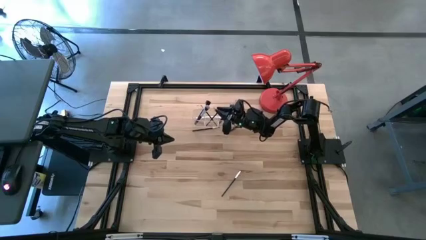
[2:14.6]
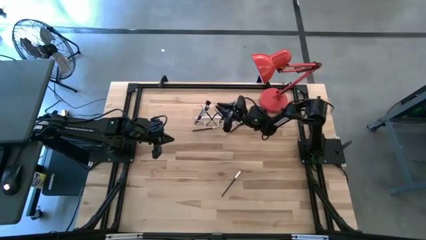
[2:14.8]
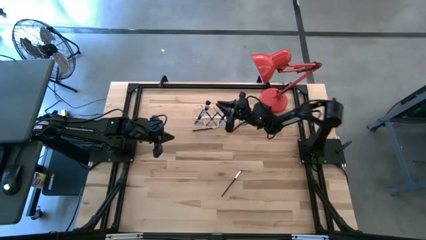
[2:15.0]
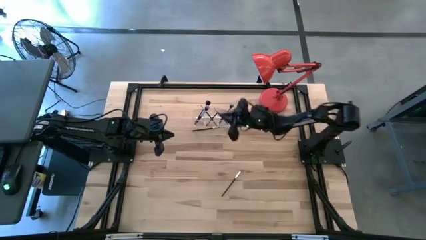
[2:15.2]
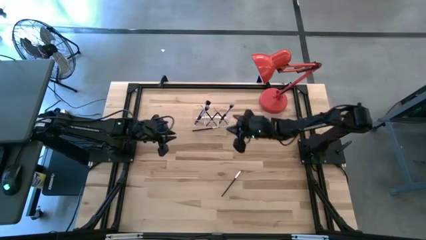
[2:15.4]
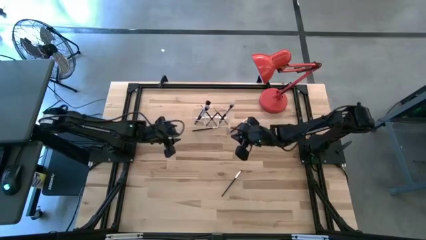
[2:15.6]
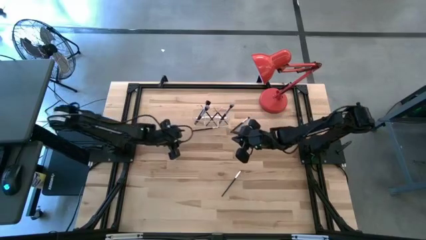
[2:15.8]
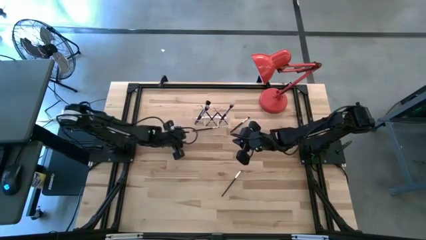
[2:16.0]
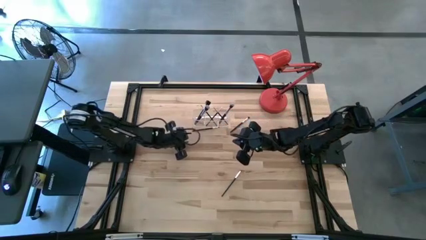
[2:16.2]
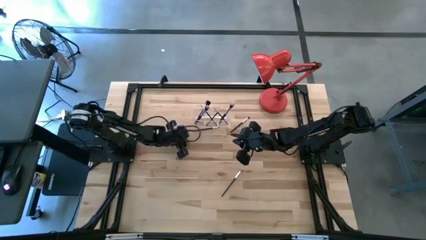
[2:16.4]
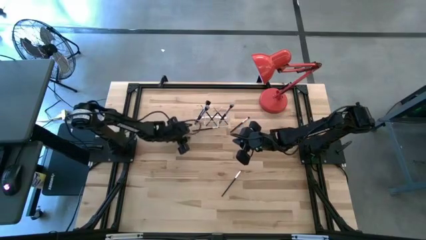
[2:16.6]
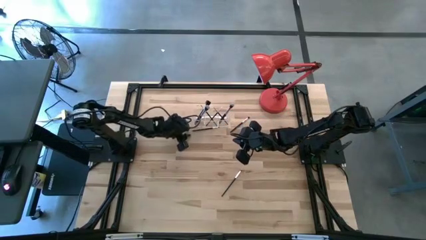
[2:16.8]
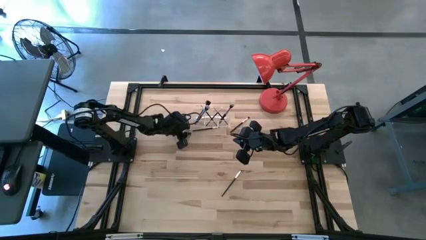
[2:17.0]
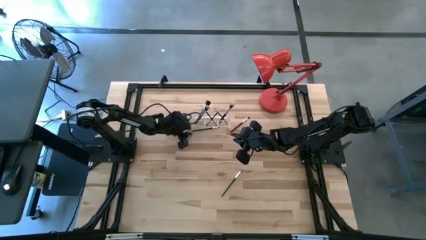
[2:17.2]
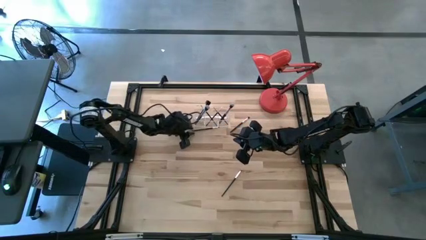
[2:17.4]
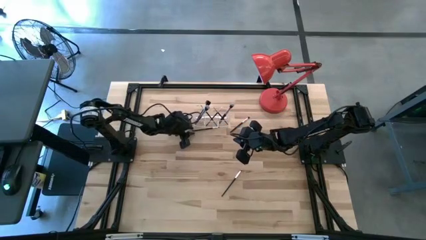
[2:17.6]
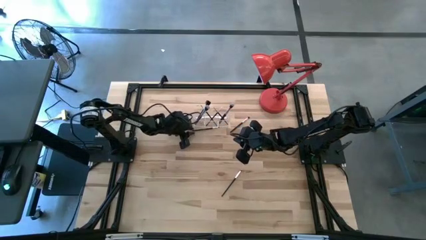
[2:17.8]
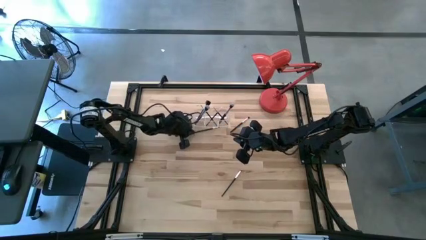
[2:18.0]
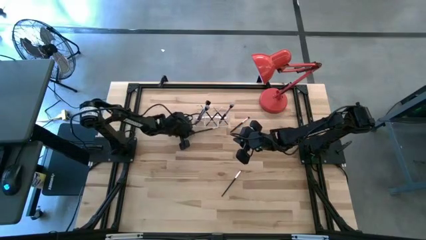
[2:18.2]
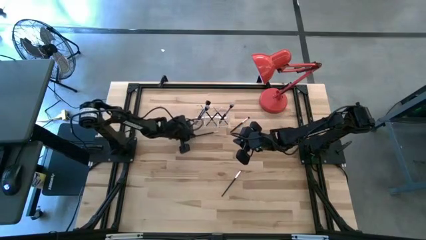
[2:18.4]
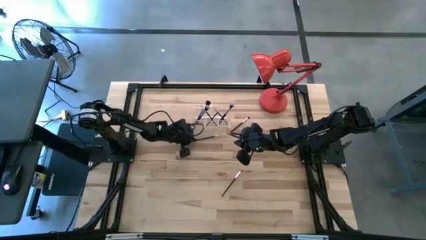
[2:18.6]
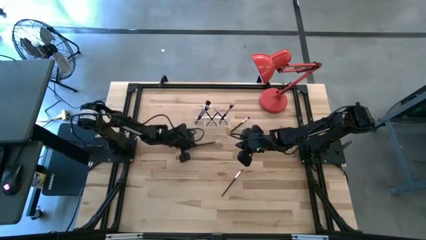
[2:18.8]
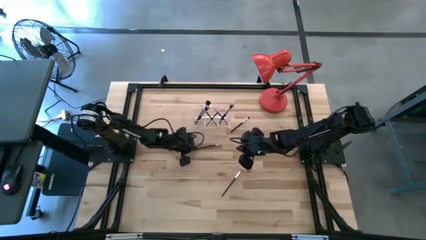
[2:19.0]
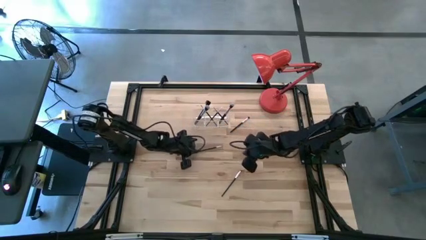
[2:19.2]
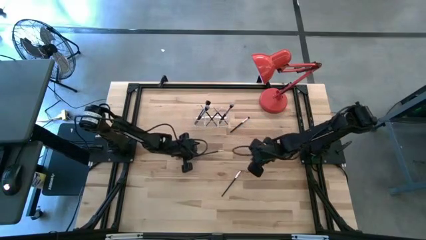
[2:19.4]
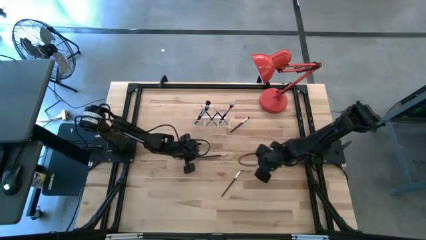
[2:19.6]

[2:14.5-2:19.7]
Task: Put items in baskets/containers
Put the black eyeshadow brush into the transparent organizer

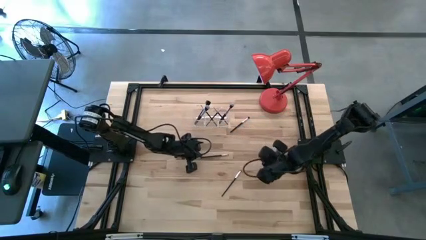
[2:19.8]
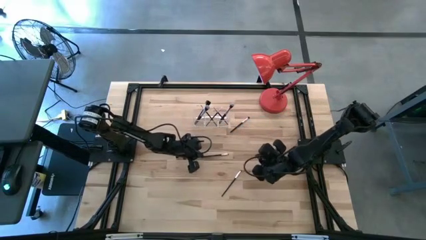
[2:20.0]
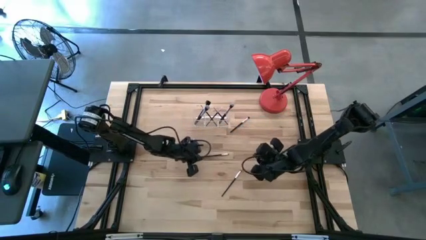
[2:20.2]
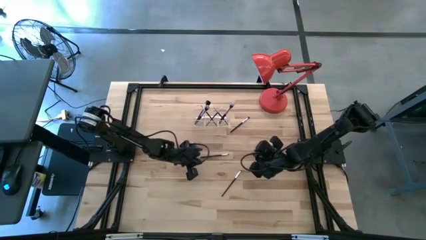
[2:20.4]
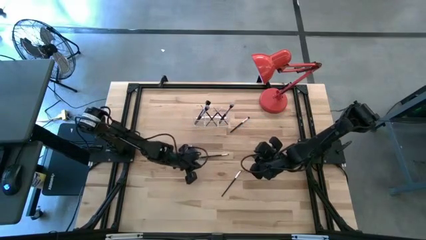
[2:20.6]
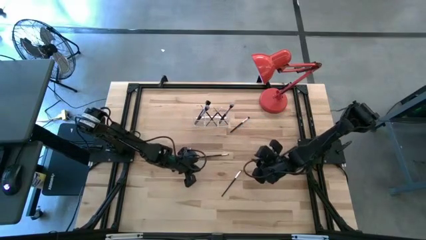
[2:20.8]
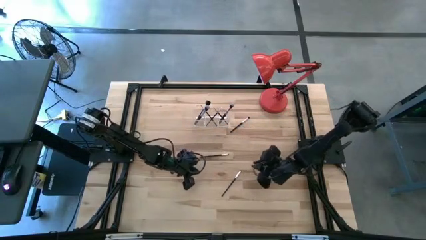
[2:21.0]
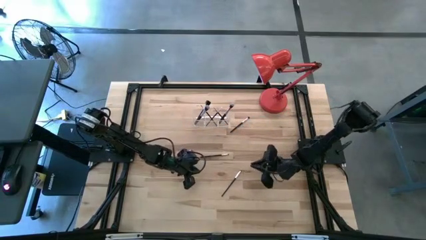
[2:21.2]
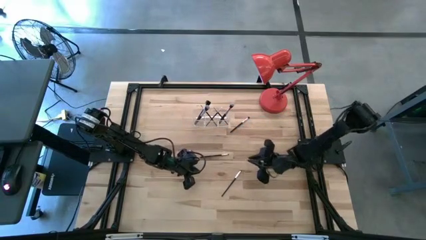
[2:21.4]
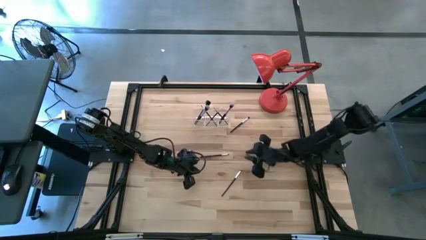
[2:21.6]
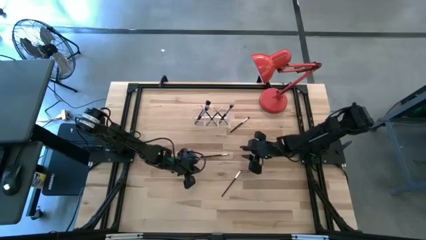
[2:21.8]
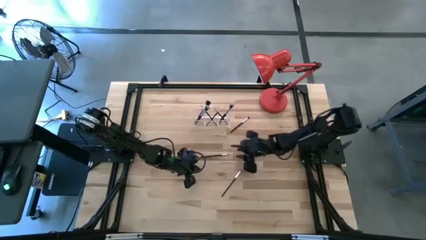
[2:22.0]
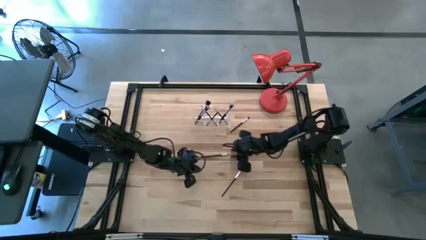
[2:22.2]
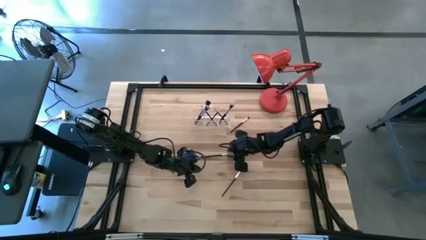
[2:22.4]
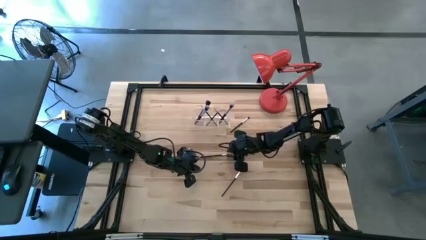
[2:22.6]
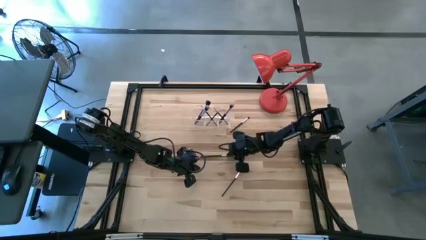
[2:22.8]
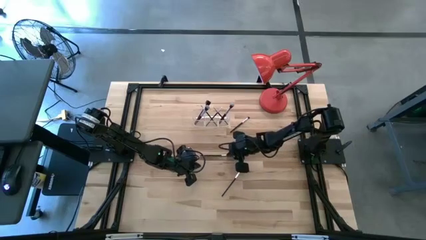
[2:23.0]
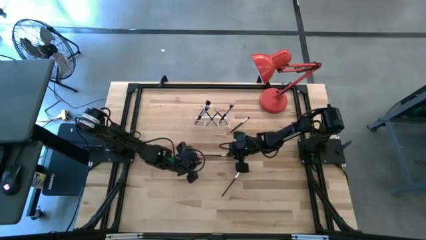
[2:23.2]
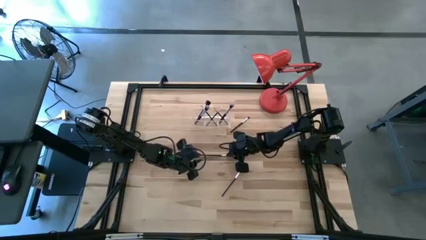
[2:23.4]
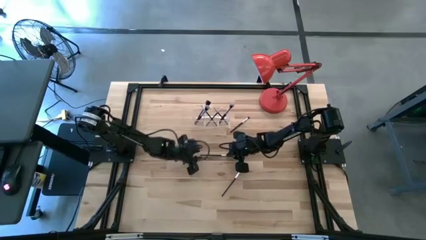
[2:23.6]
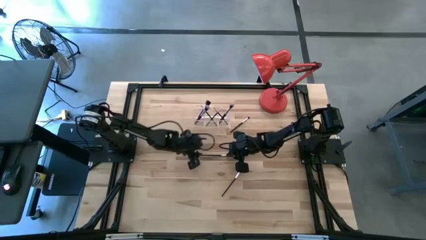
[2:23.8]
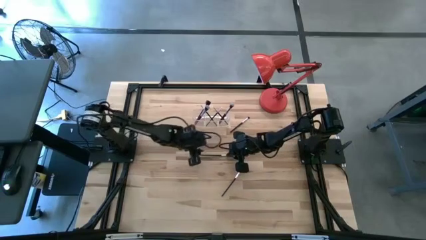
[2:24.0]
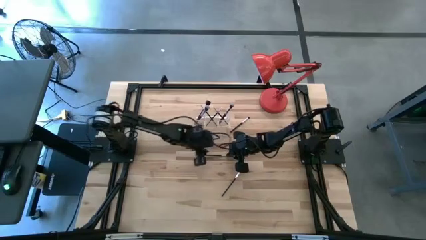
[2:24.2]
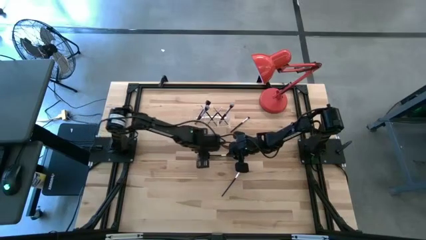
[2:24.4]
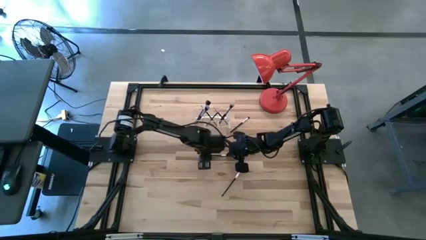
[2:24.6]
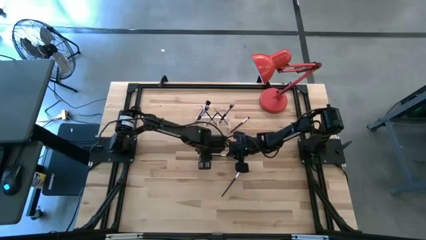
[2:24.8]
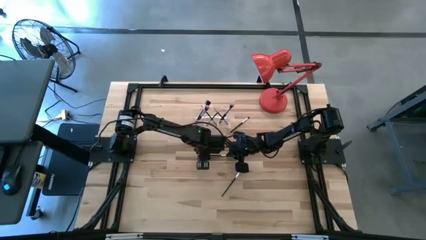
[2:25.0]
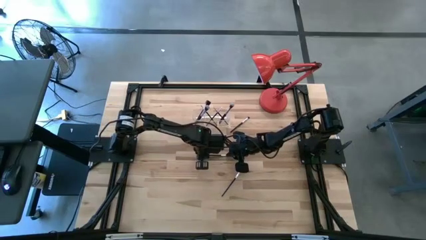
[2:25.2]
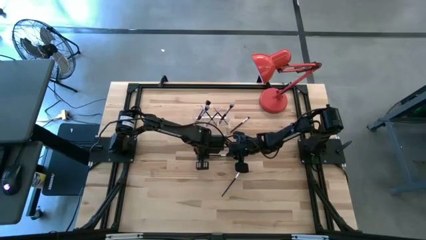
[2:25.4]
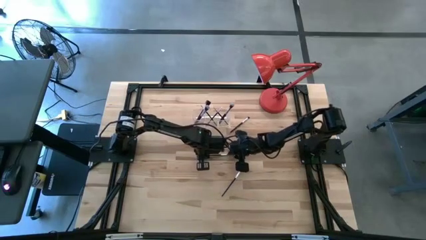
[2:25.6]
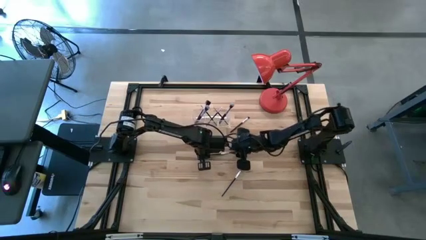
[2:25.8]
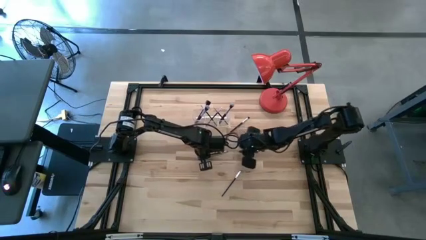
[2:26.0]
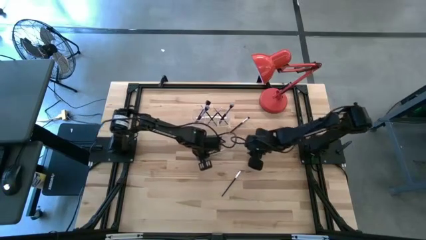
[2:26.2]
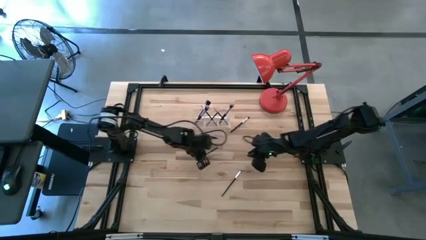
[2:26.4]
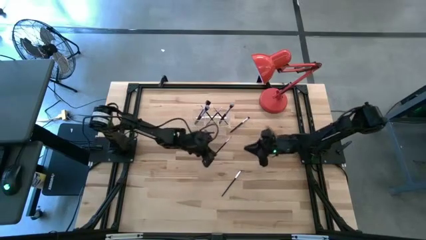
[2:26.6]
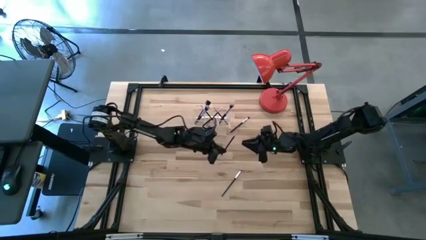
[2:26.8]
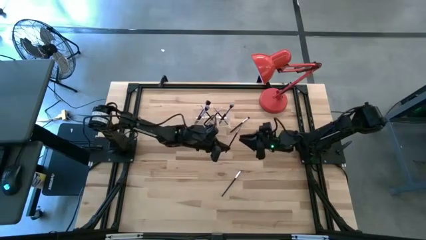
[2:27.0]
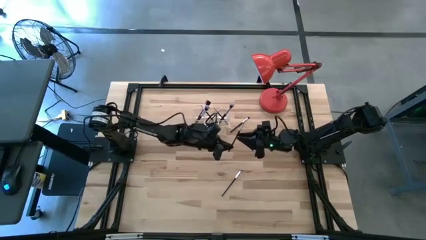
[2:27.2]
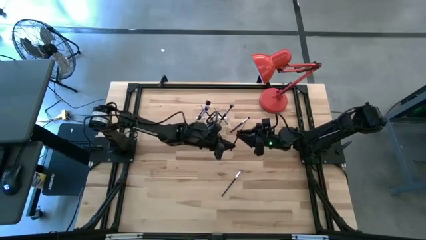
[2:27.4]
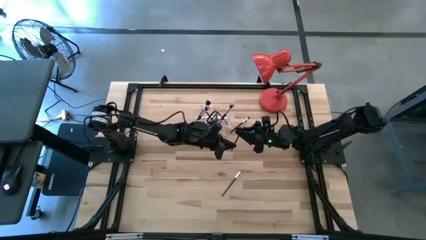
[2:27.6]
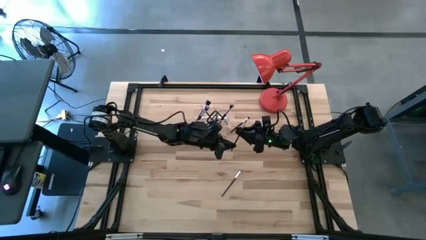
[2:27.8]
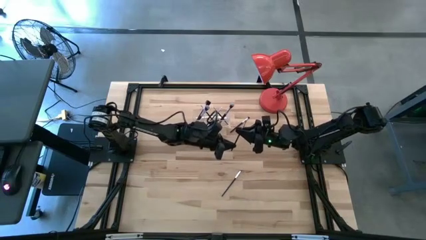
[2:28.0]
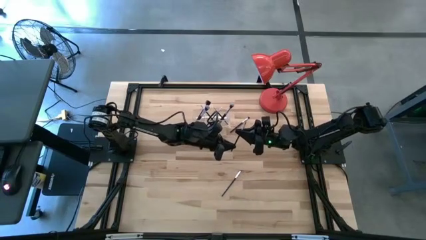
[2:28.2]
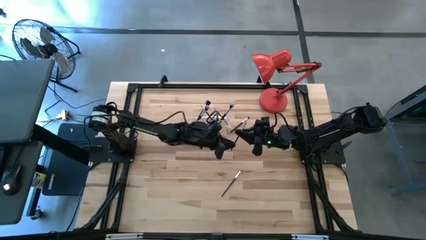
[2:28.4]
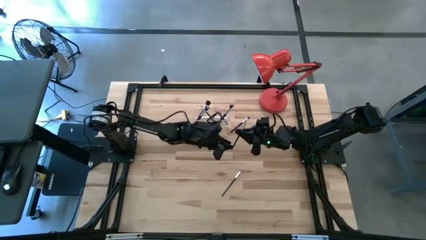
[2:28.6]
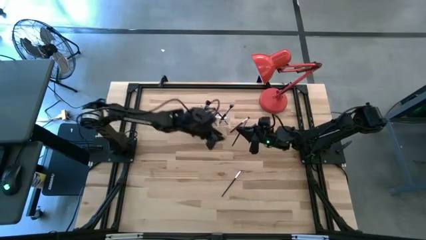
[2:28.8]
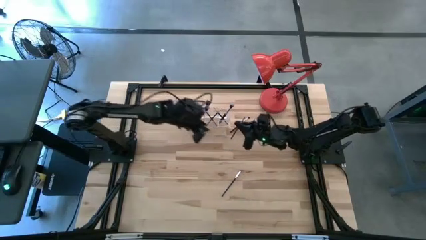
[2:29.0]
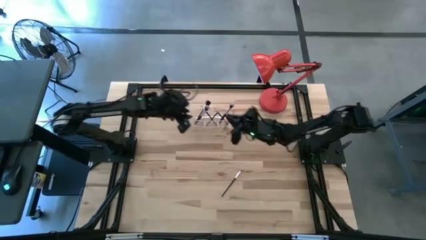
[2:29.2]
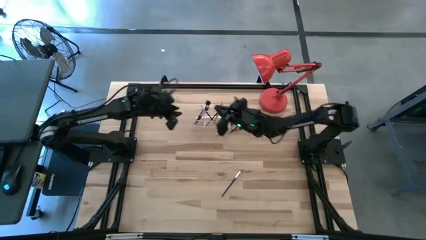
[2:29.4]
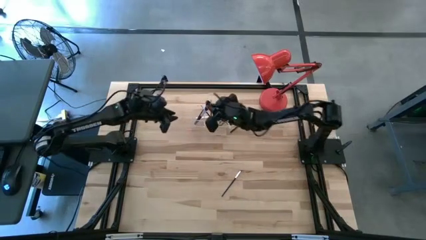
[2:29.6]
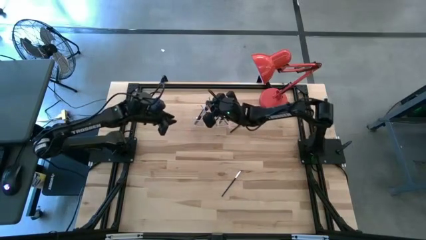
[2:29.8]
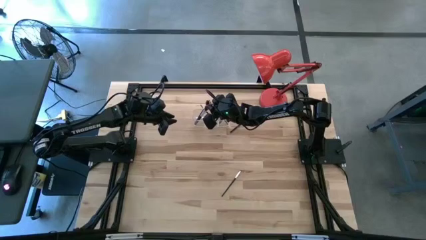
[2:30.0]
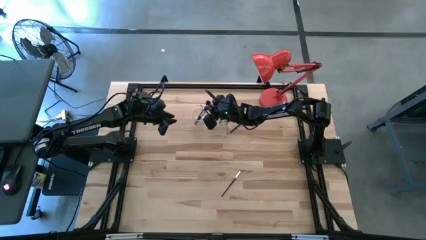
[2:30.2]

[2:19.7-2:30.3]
Put the black eyeshadow brush into the transparent organizer
